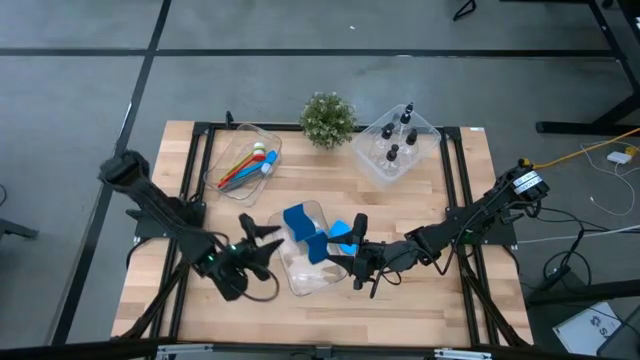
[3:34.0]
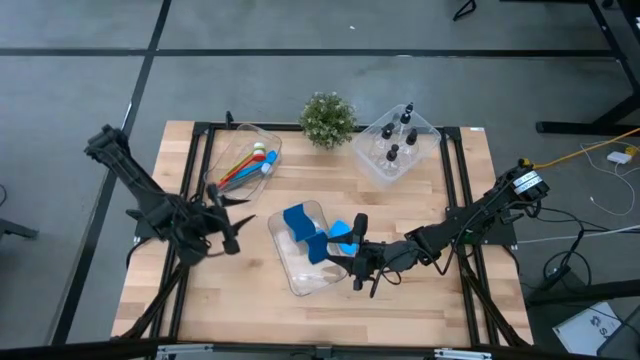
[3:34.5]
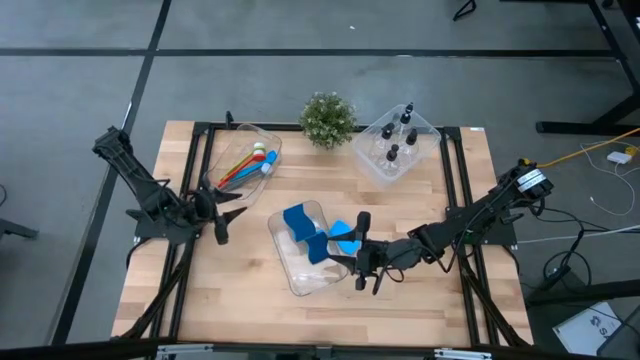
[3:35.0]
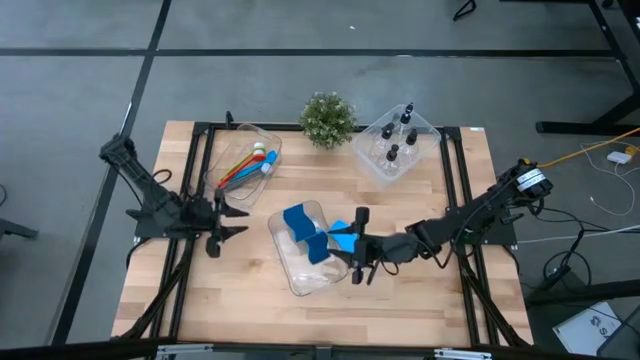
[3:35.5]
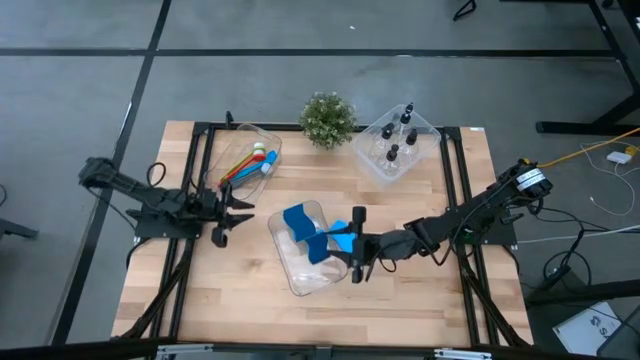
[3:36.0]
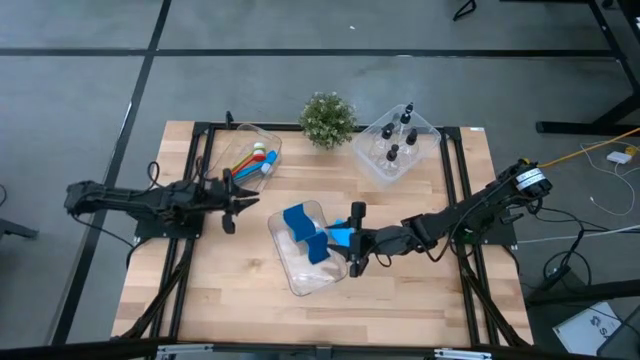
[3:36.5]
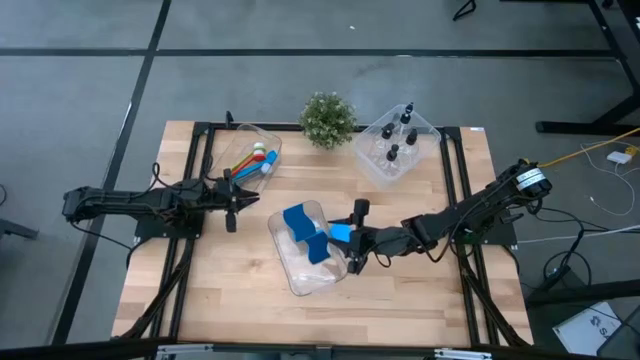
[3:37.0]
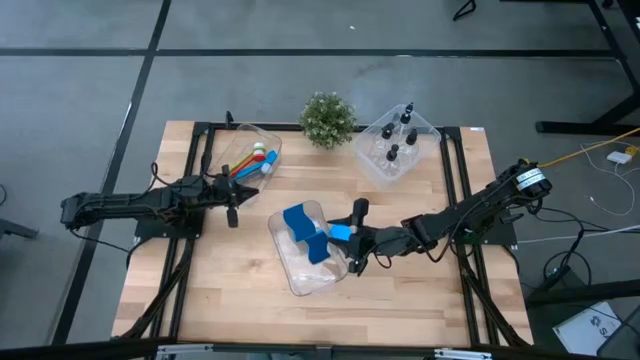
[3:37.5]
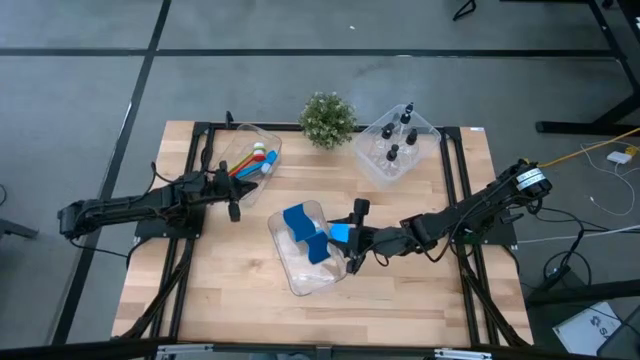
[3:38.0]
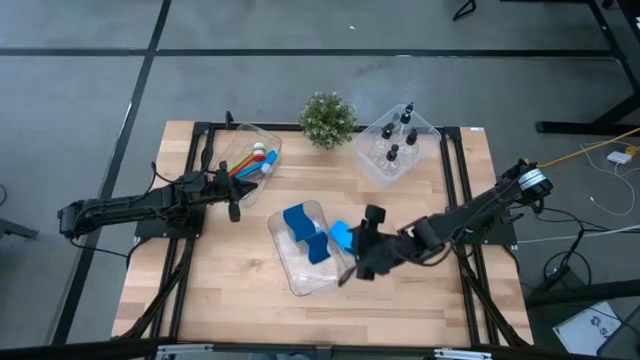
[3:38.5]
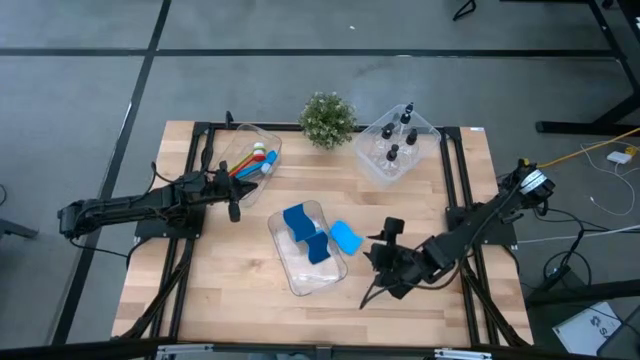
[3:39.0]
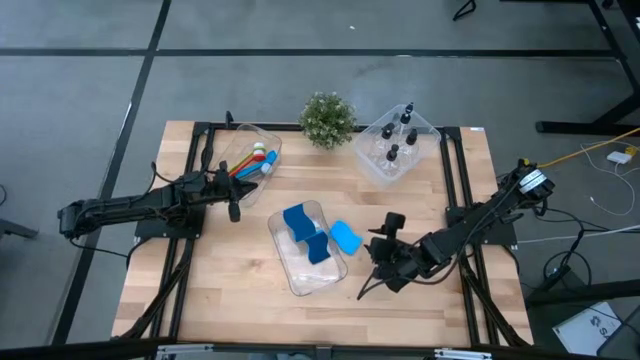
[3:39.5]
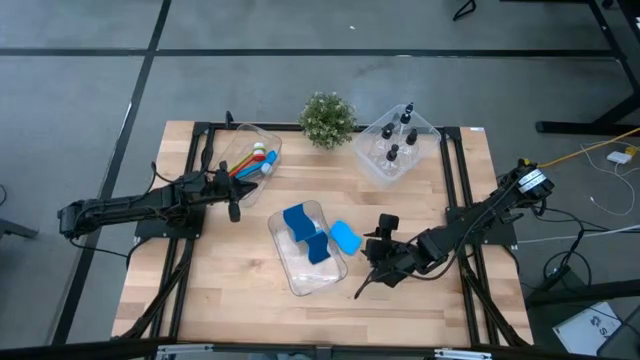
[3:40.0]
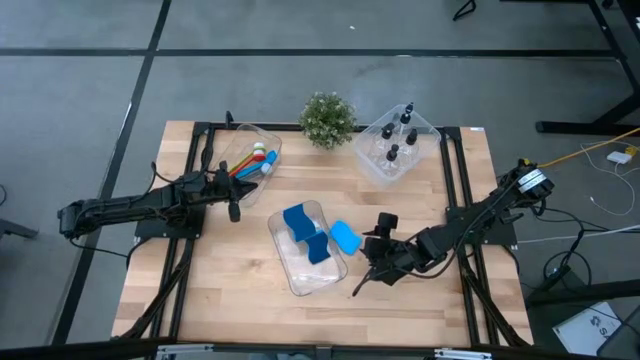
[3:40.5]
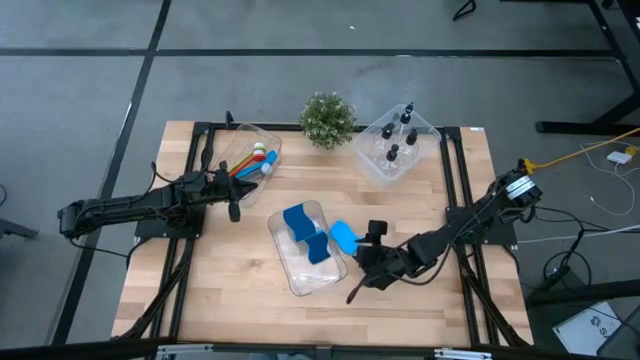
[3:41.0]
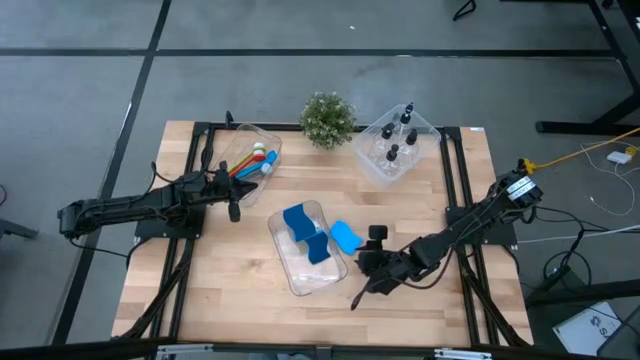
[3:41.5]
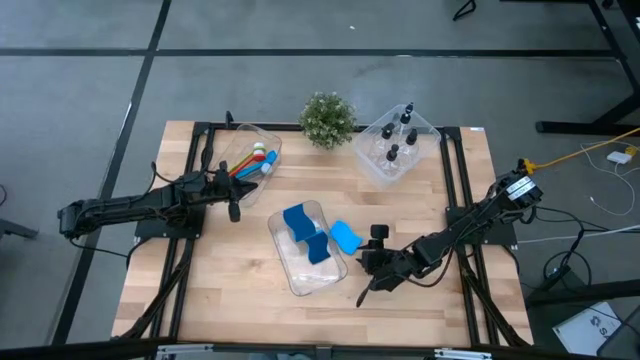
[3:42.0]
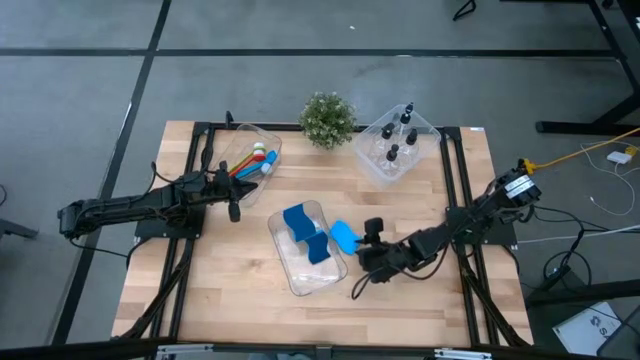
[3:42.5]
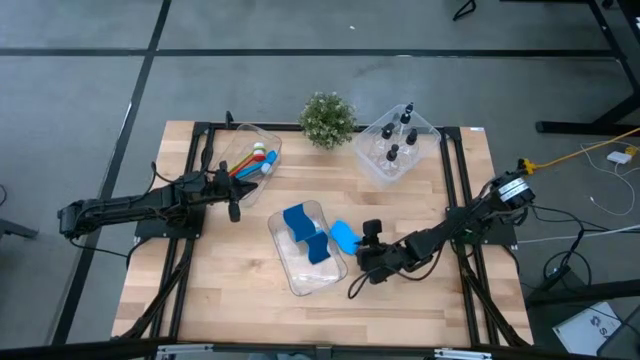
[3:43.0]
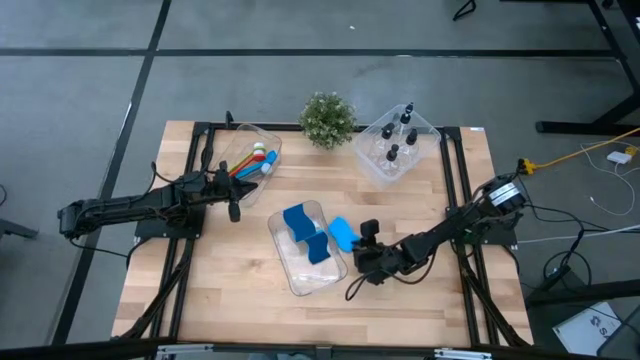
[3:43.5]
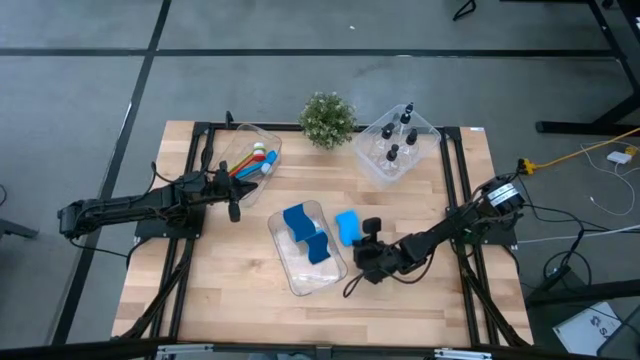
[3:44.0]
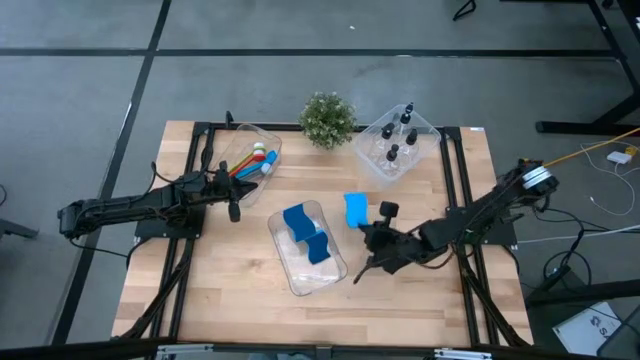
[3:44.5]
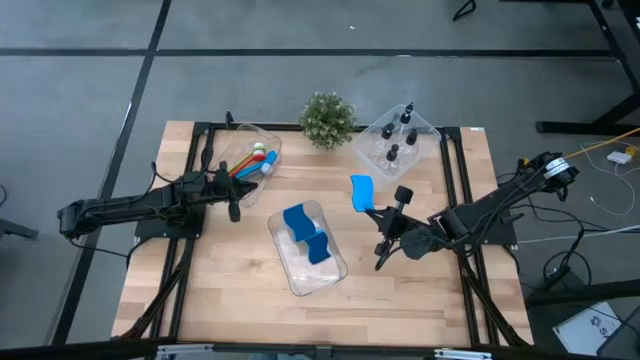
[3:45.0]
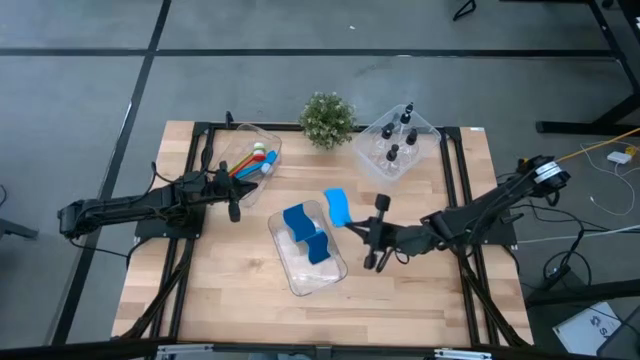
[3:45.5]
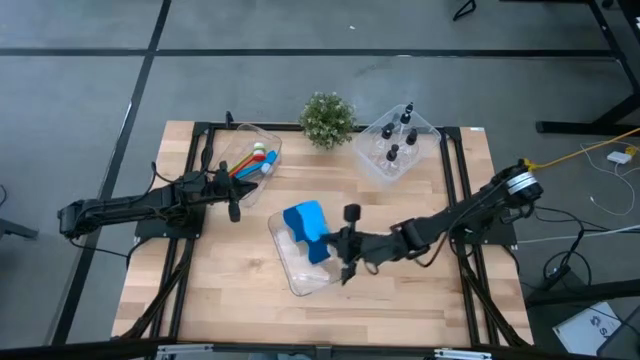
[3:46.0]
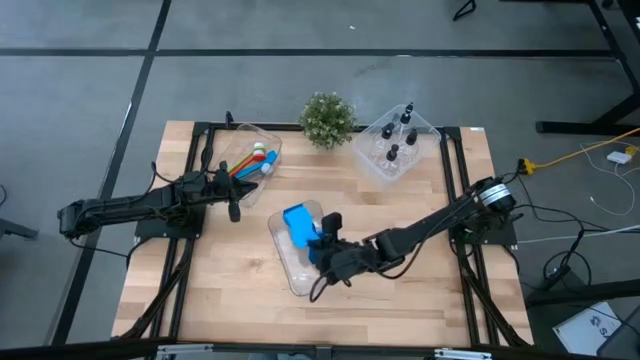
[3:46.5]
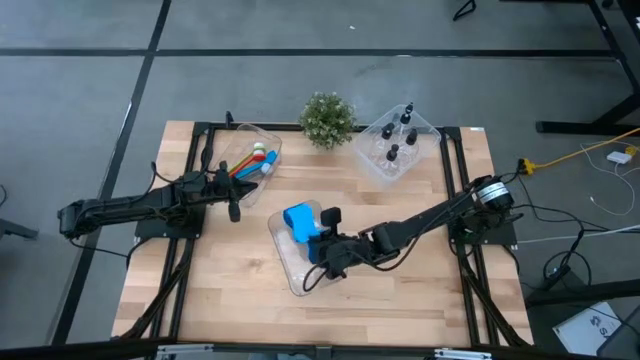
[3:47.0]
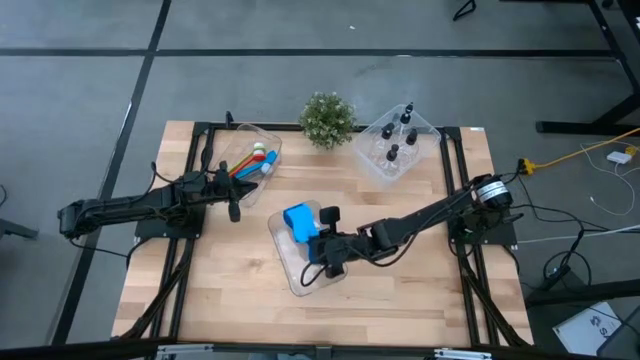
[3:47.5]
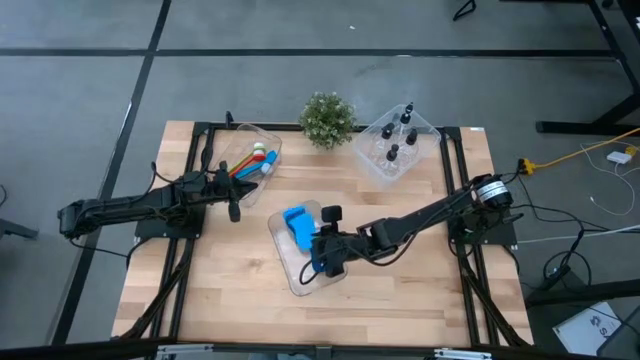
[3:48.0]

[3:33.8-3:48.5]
Task: Pick & Place Kitchen Sink Supplies
Put the sponge into the bottom transparent bin

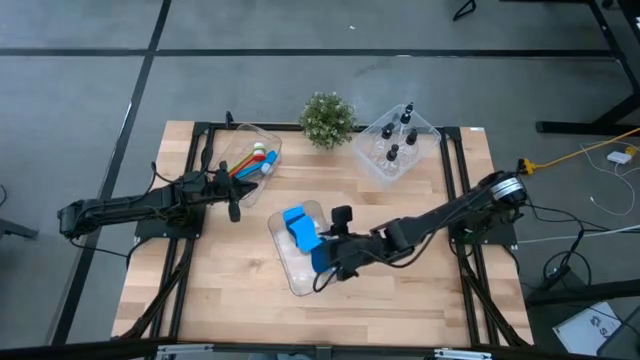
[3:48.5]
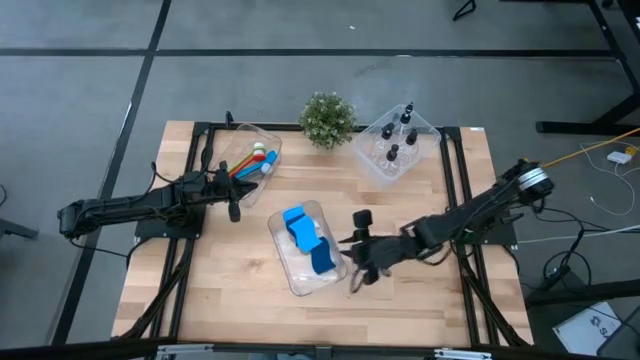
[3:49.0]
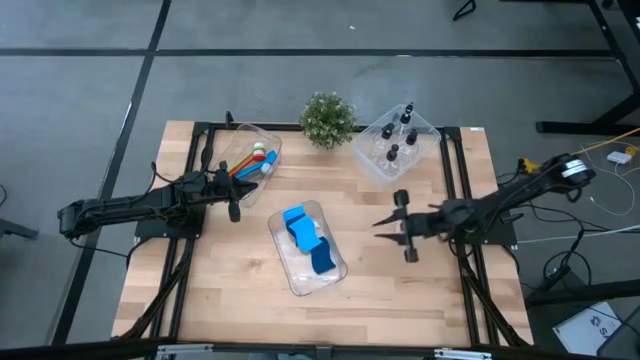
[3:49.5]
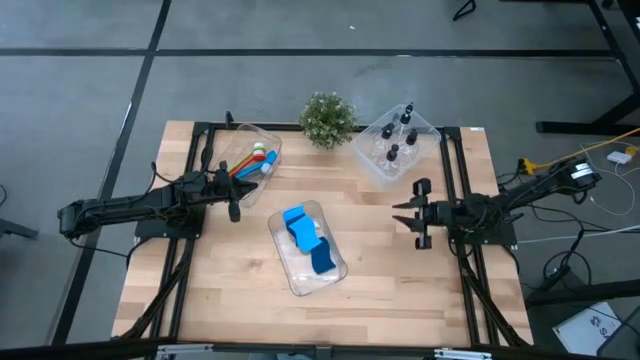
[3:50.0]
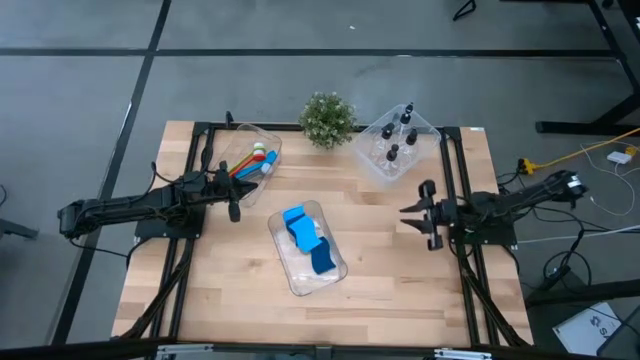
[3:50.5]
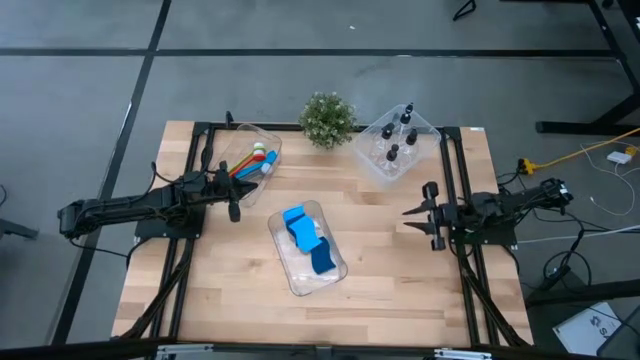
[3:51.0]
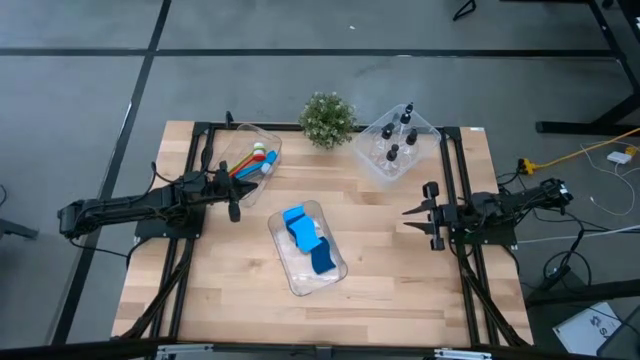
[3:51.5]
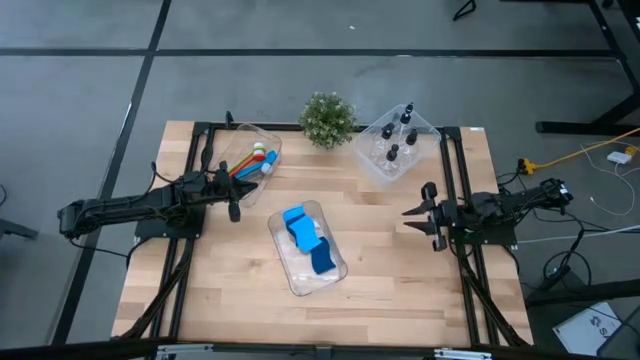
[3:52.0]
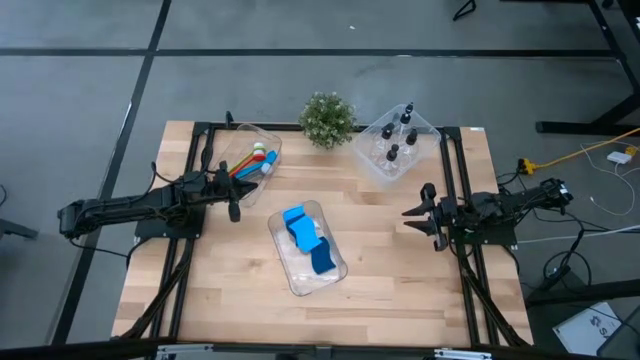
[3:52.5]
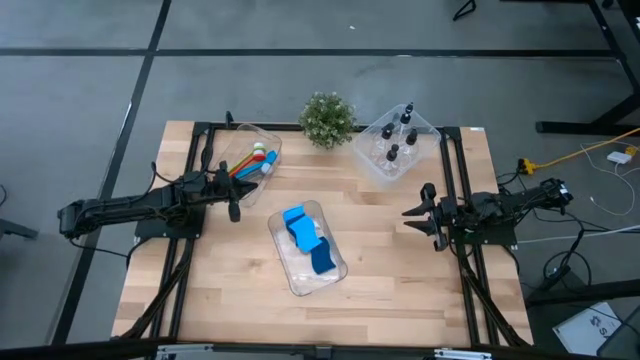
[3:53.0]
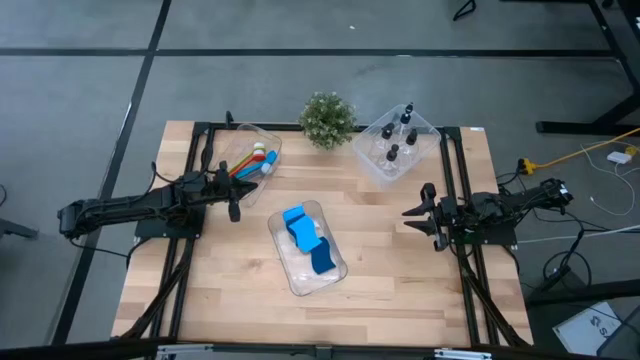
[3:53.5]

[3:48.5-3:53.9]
Return to Home Position

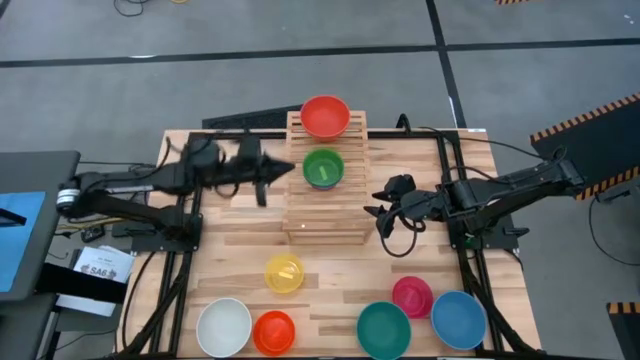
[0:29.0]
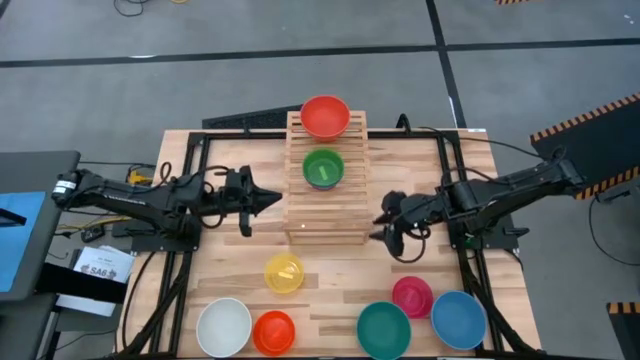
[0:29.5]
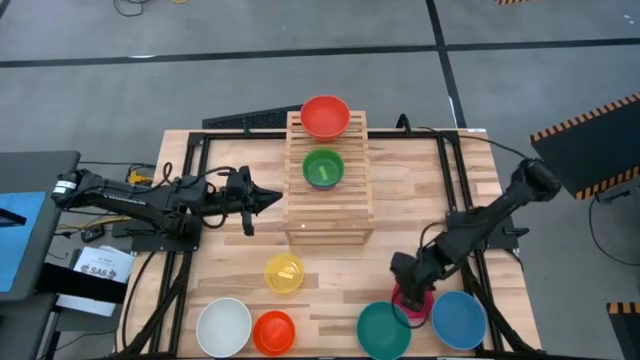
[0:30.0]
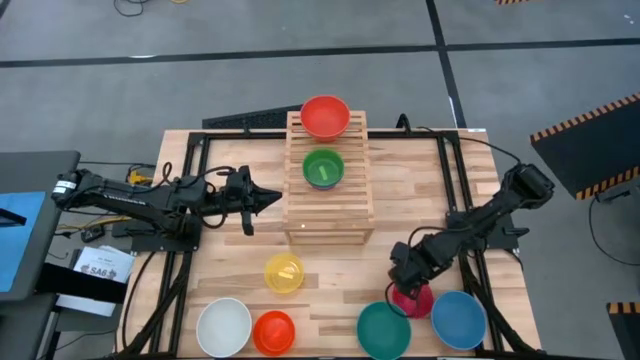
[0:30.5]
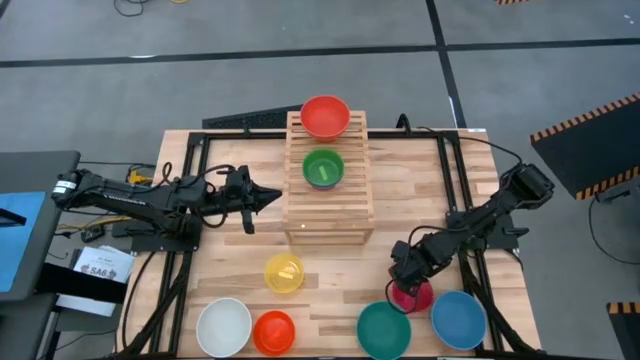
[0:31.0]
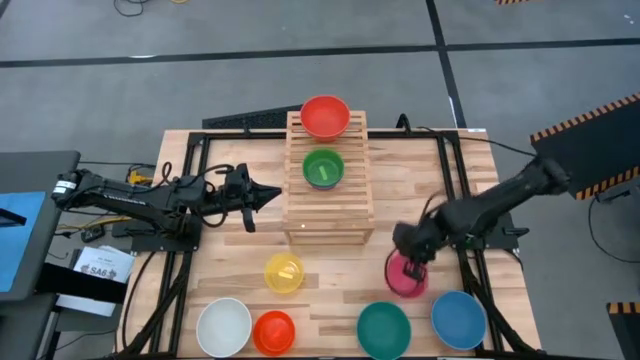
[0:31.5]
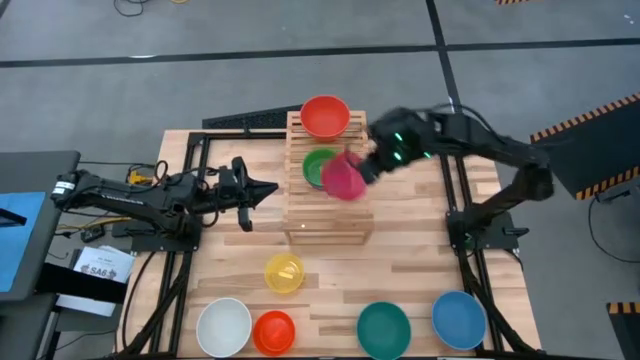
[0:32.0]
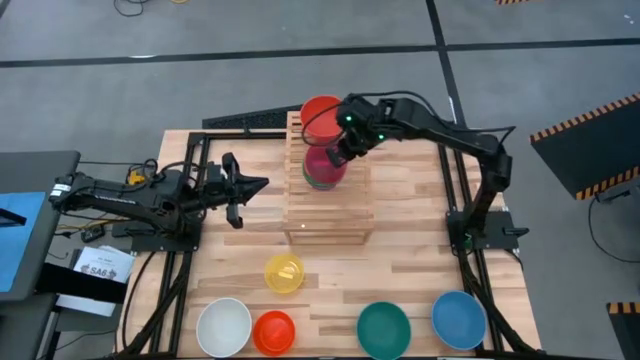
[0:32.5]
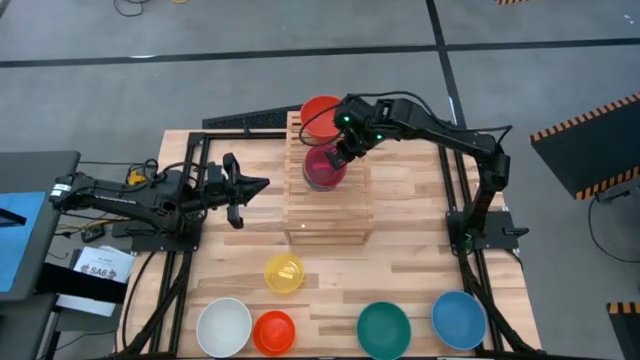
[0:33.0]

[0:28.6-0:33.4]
Task: Place and stack bowls onto a shelf
Stack the small red bowl on top of the small green bowl on the shelf
